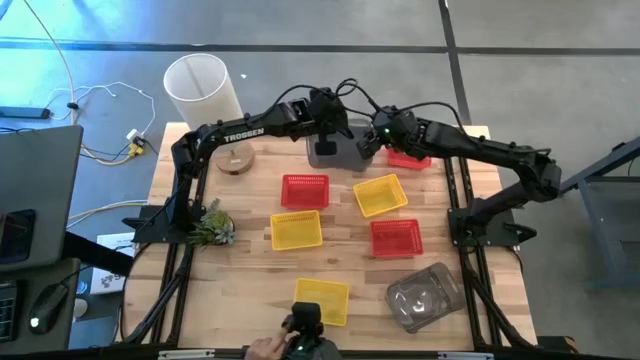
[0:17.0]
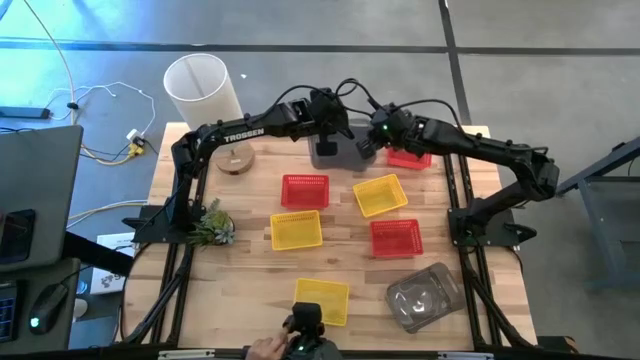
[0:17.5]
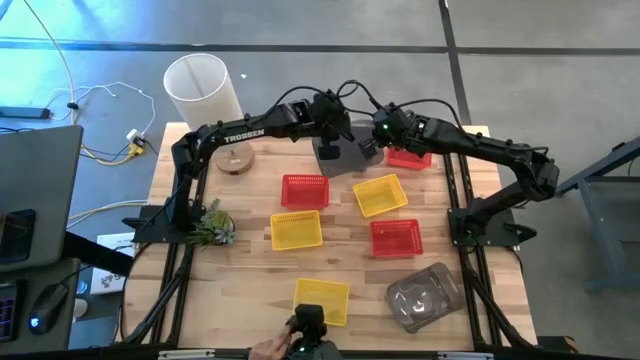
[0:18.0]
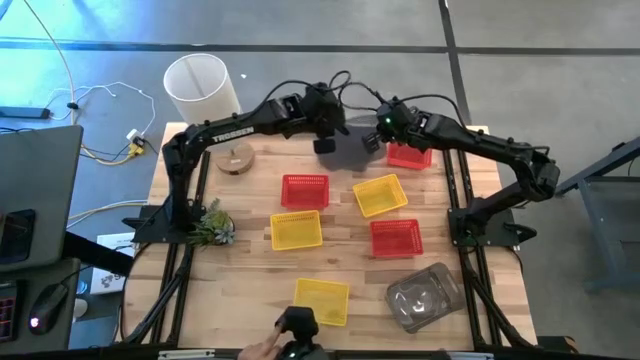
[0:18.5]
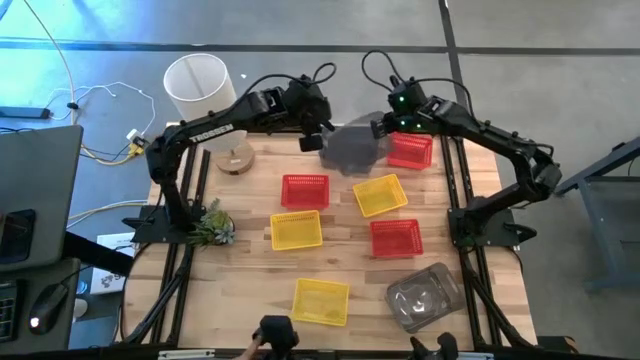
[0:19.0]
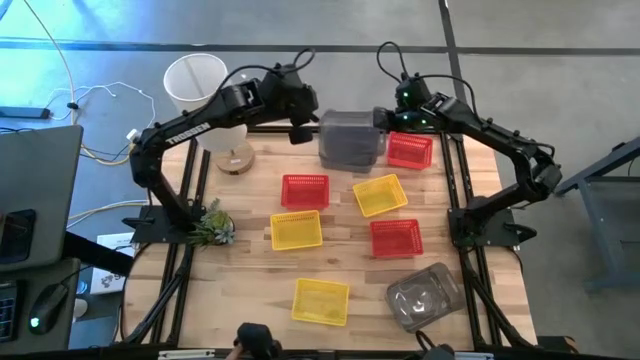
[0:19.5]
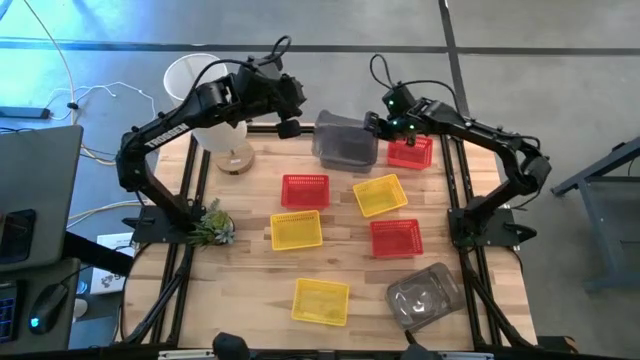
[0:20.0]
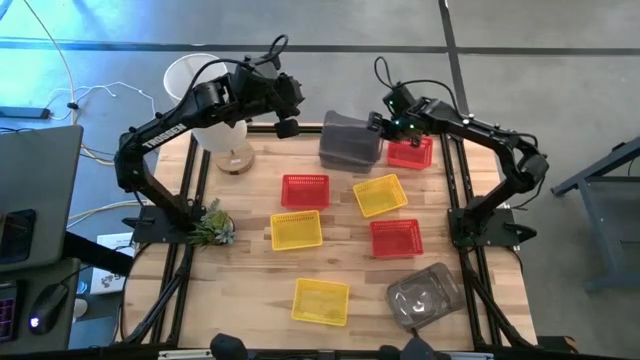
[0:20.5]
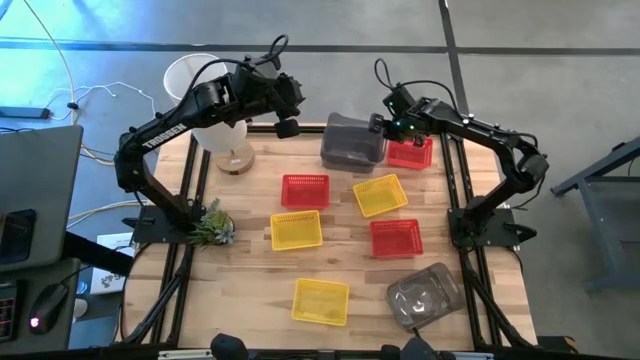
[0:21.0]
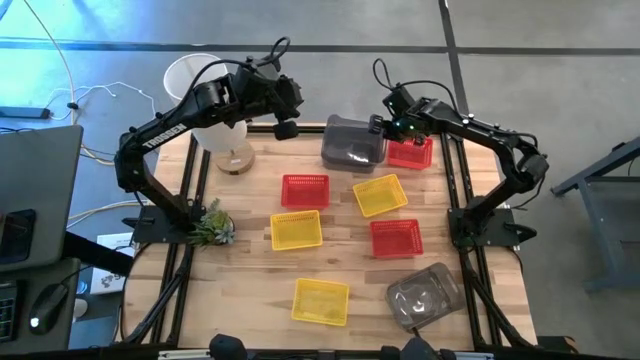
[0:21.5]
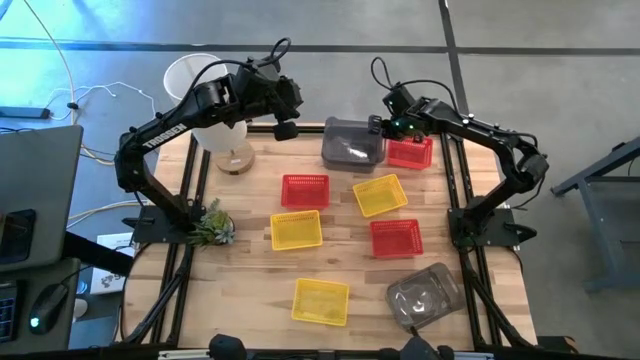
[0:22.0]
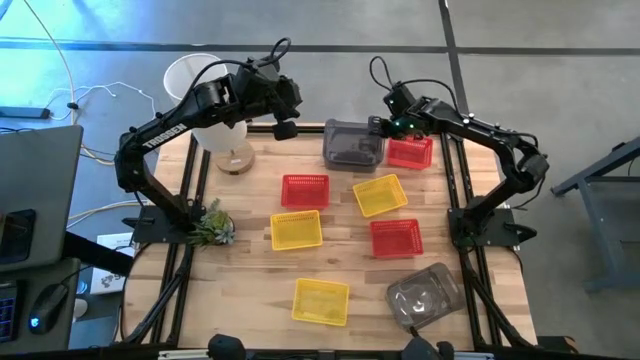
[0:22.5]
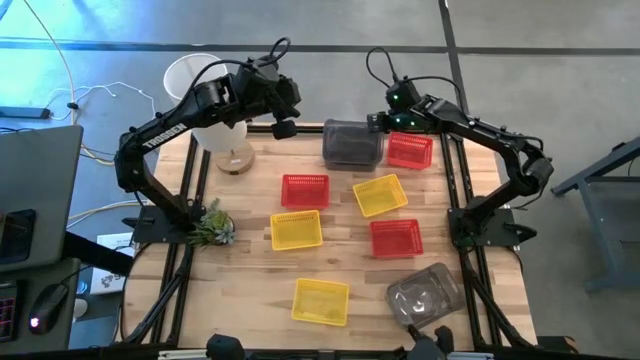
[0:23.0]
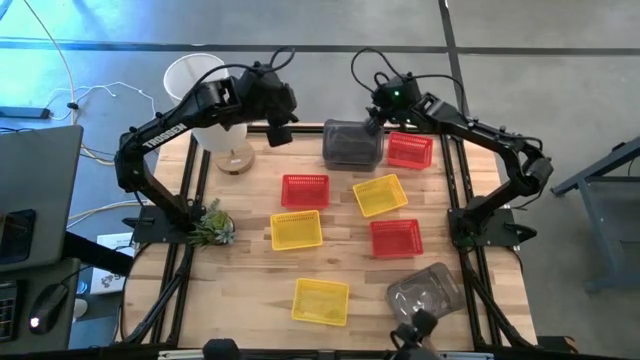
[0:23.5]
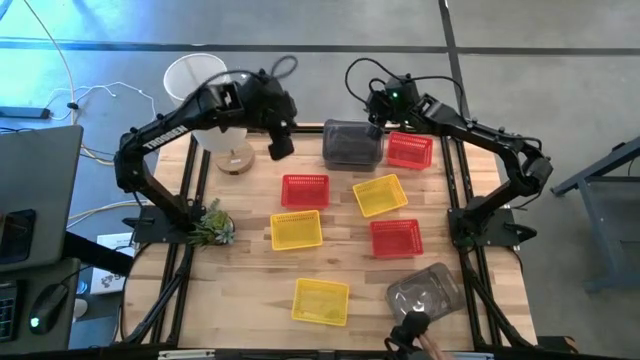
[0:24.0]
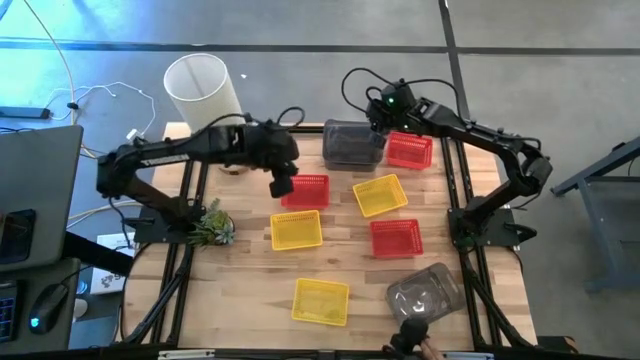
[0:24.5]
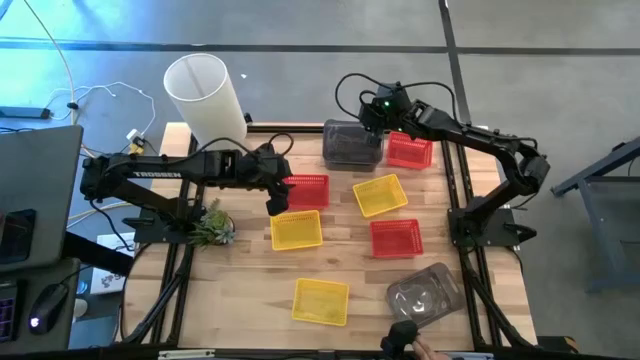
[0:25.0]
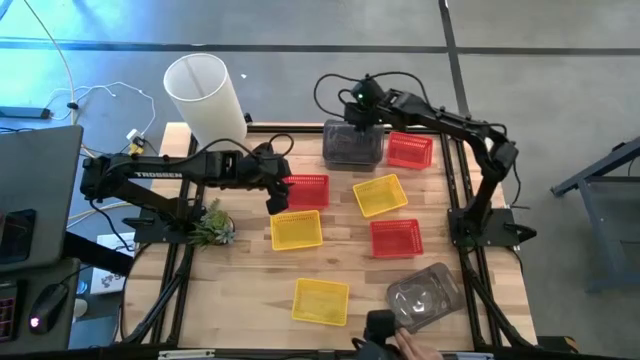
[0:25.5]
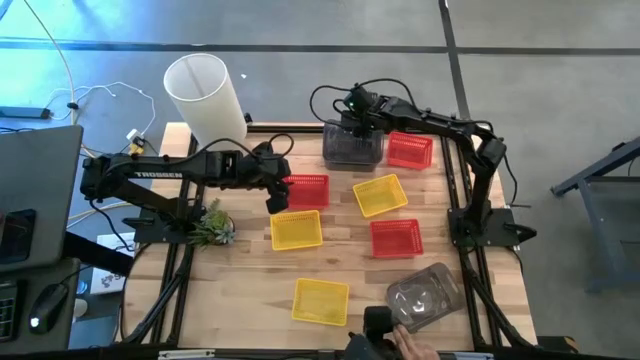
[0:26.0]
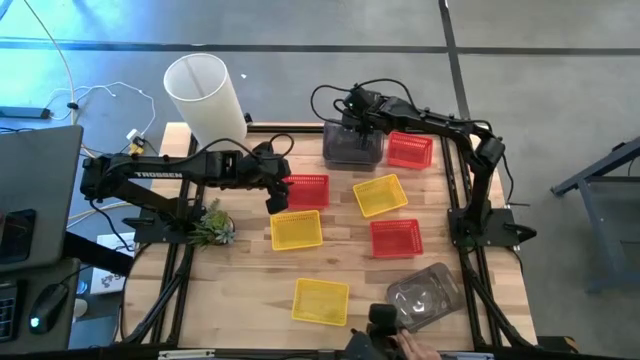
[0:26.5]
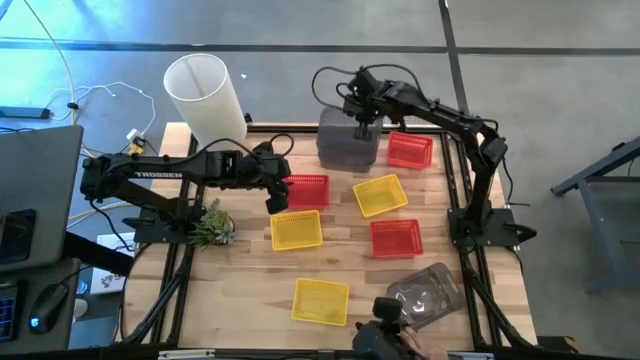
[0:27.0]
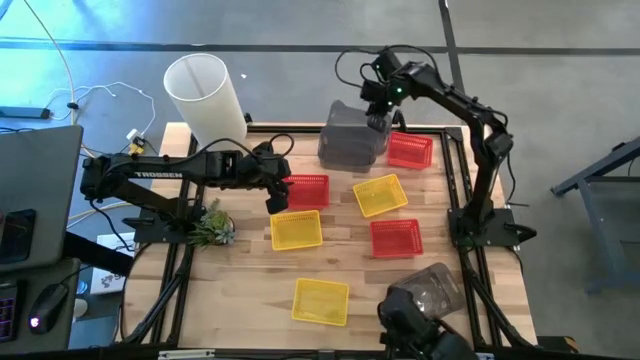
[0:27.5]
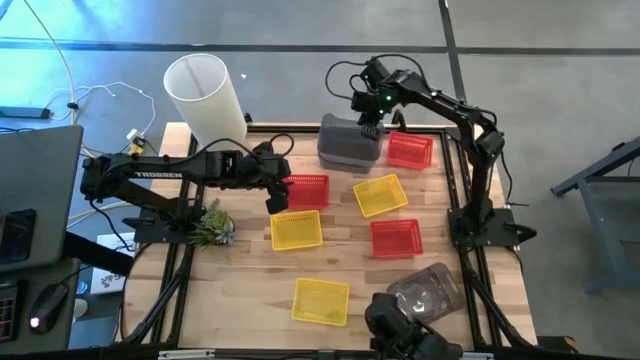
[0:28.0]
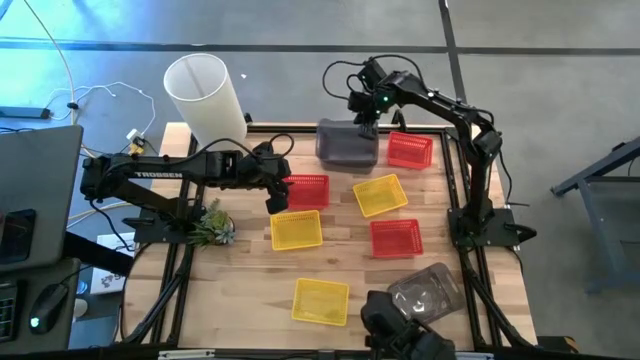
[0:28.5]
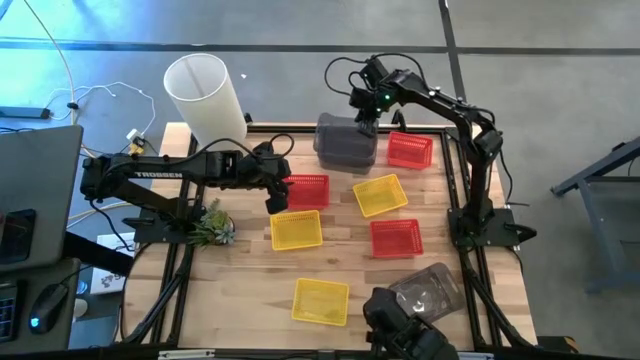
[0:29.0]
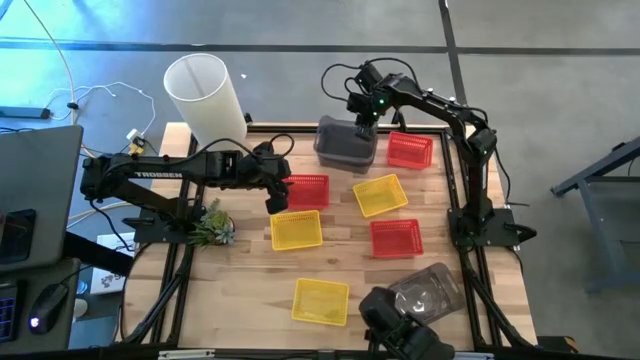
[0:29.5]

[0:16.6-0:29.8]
Stack the bottom left black bin on the top black bin

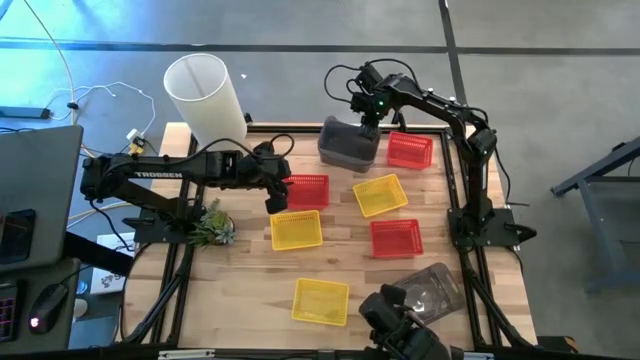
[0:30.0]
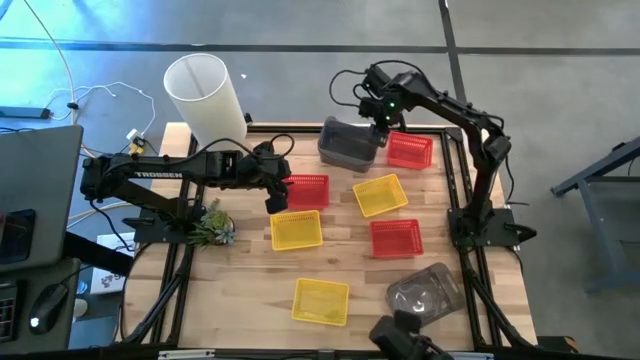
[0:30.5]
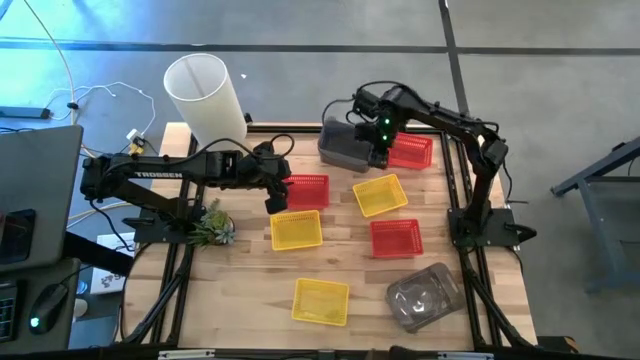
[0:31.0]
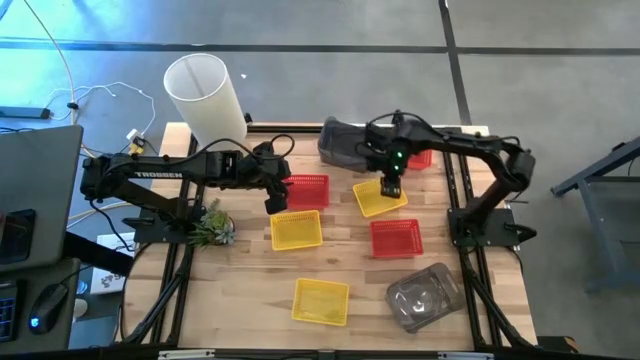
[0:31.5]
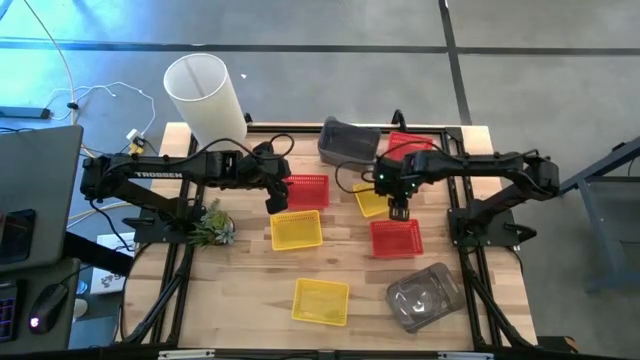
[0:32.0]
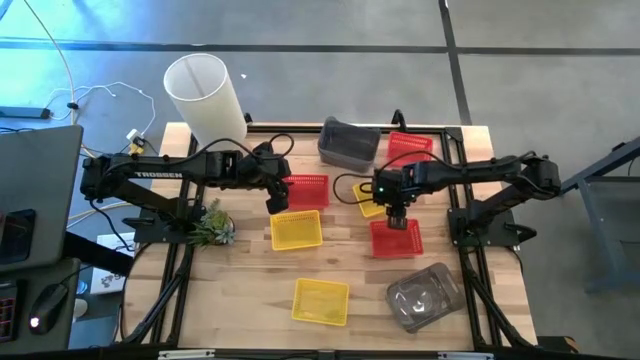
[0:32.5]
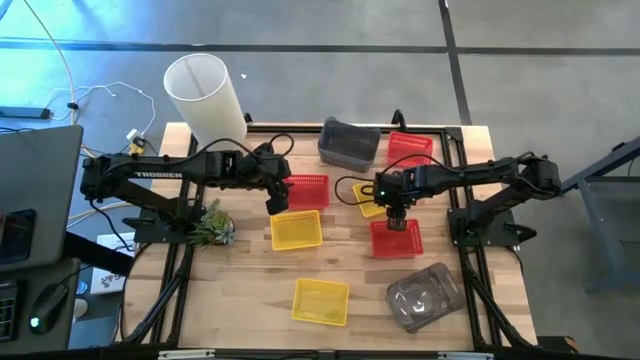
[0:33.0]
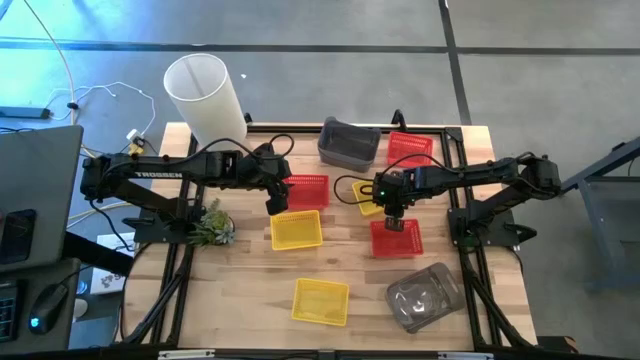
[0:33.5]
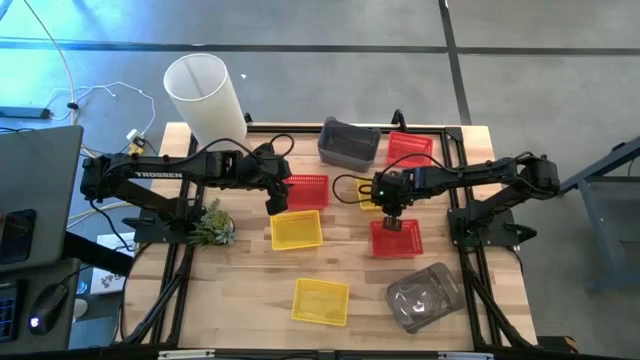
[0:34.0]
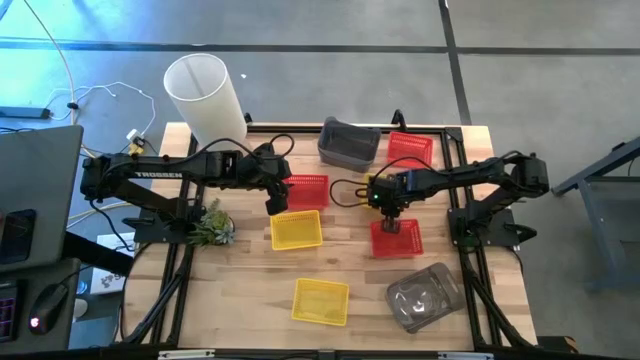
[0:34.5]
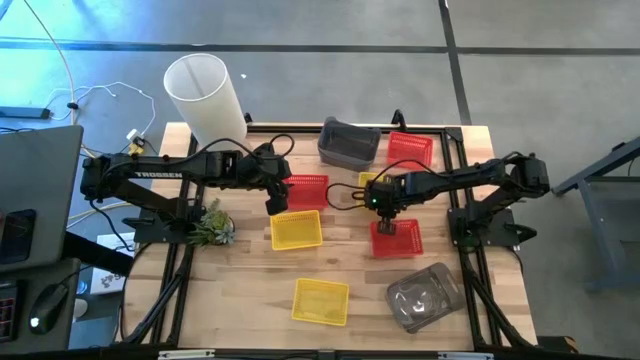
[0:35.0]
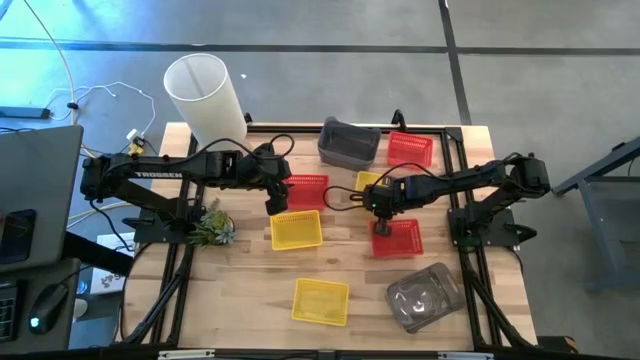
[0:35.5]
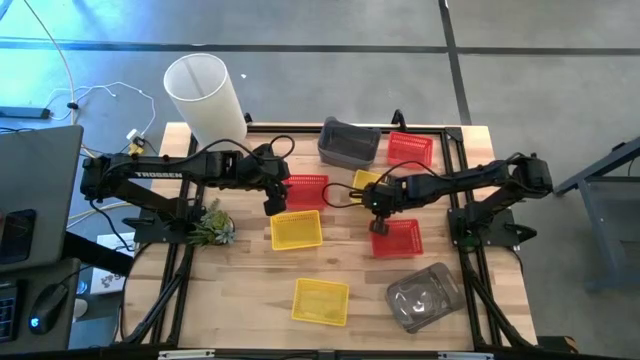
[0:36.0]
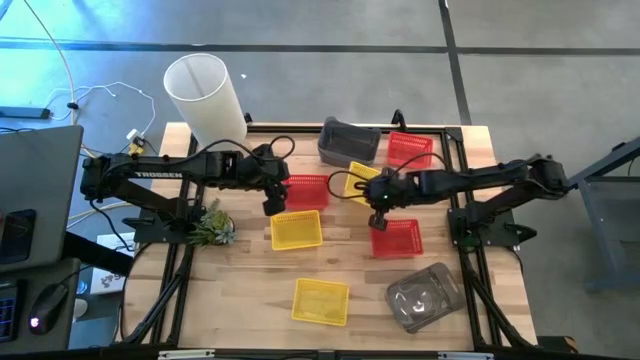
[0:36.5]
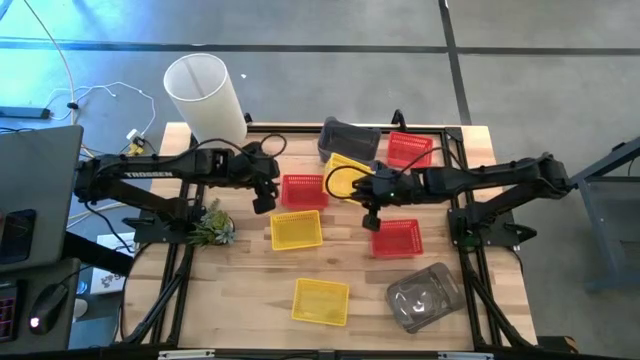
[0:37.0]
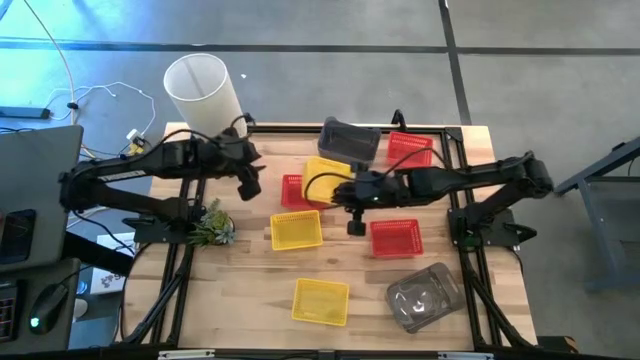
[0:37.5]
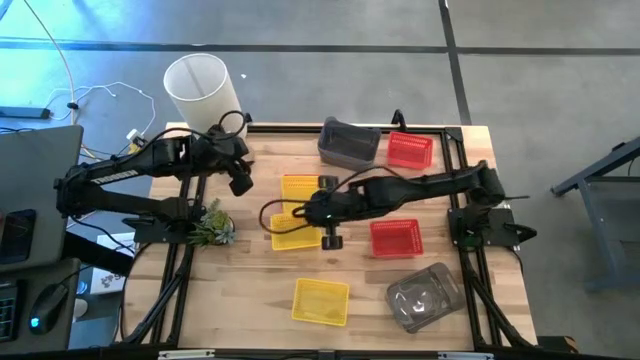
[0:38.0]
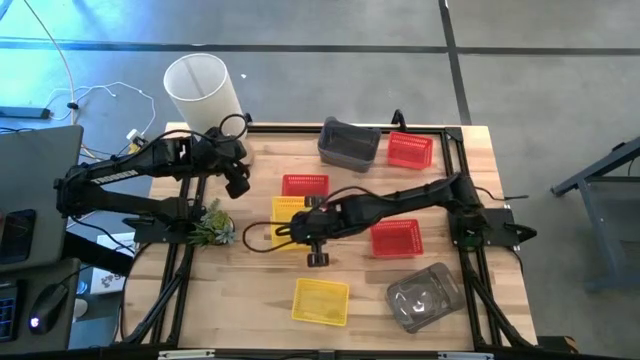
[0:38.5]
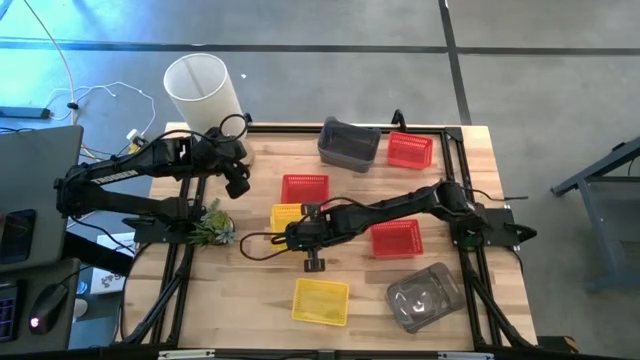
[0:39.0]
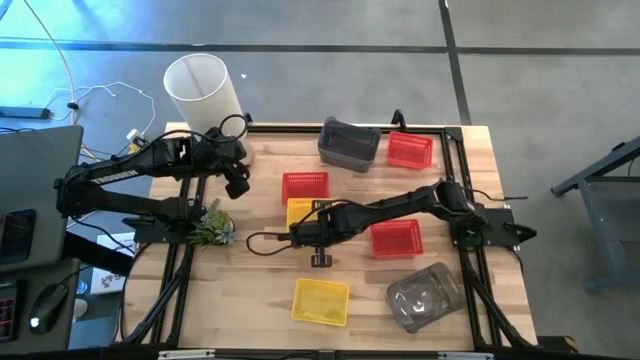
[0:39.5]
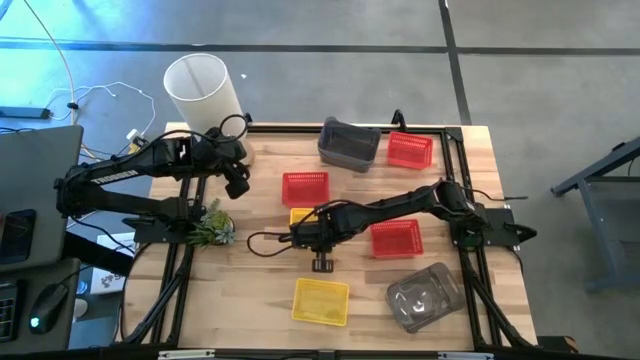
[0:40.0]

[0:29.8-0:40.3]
Stack the top yellow bin on the middle yellow bin
